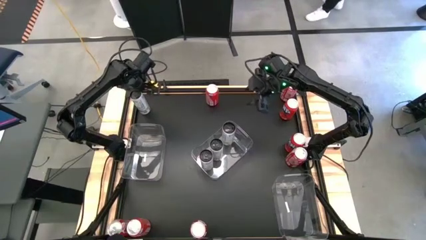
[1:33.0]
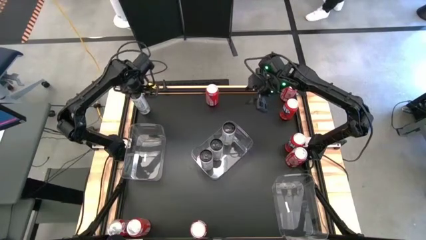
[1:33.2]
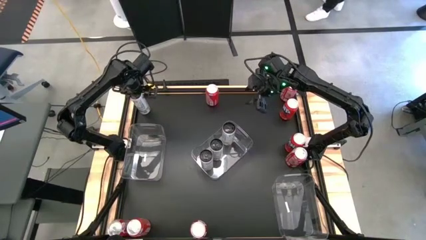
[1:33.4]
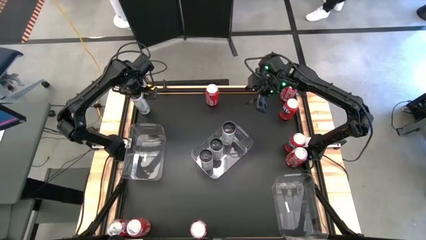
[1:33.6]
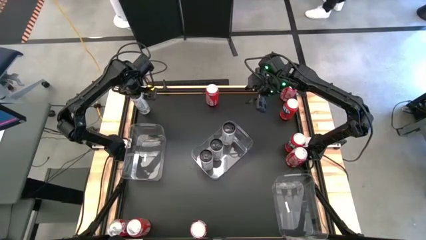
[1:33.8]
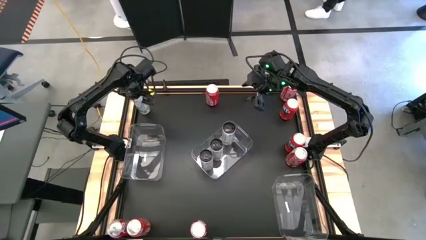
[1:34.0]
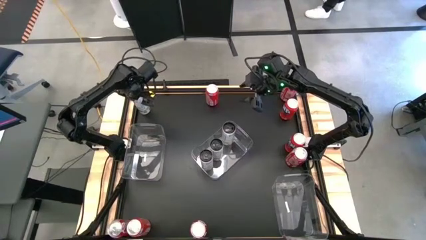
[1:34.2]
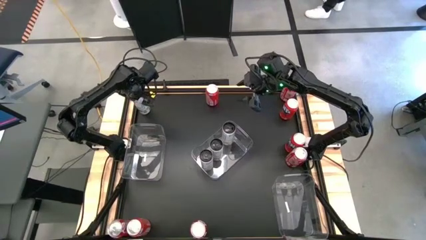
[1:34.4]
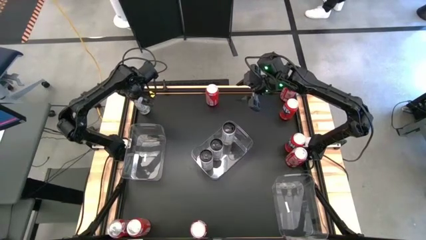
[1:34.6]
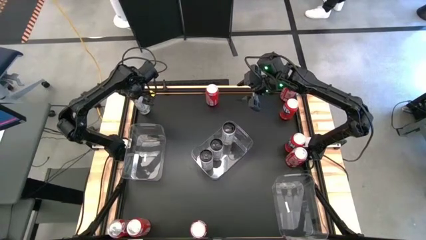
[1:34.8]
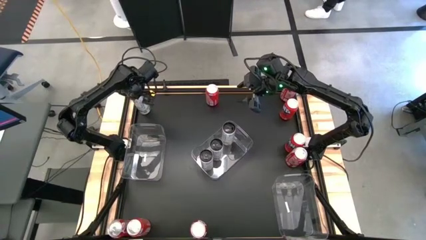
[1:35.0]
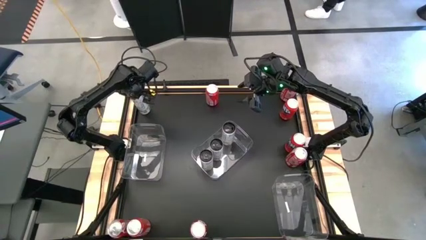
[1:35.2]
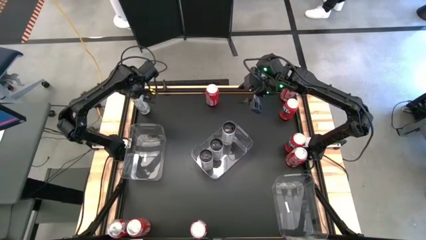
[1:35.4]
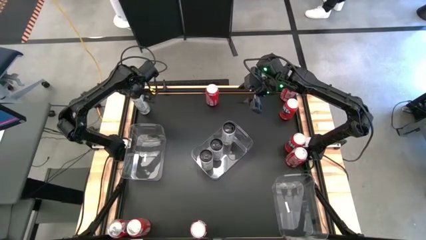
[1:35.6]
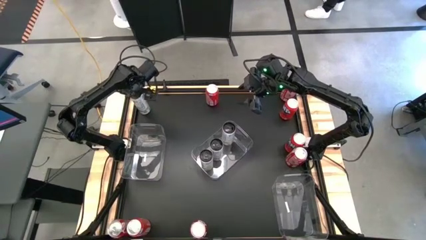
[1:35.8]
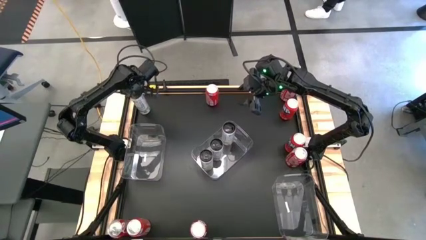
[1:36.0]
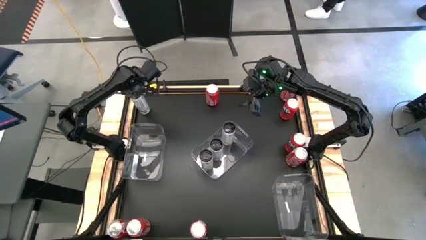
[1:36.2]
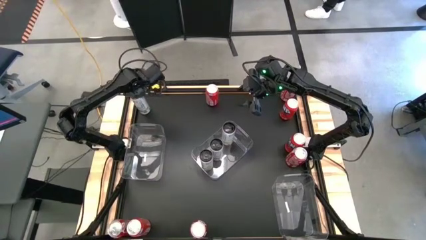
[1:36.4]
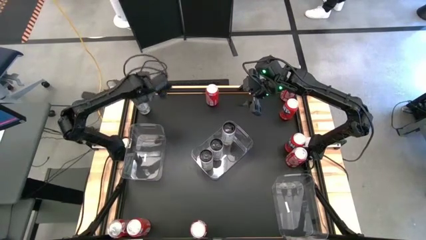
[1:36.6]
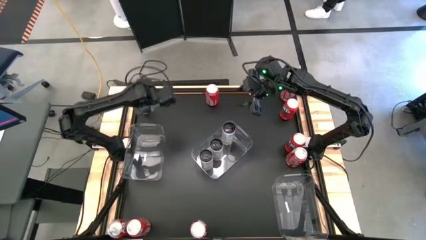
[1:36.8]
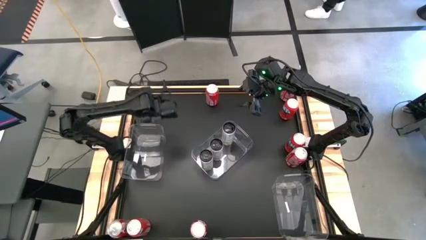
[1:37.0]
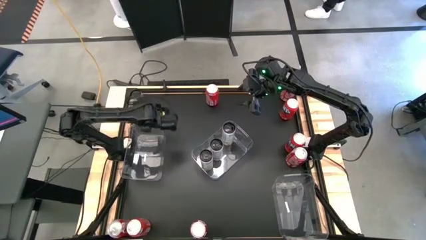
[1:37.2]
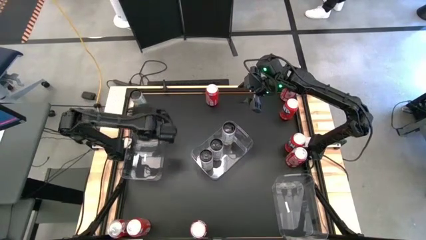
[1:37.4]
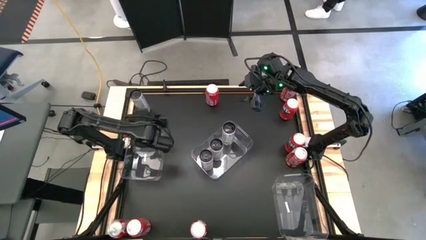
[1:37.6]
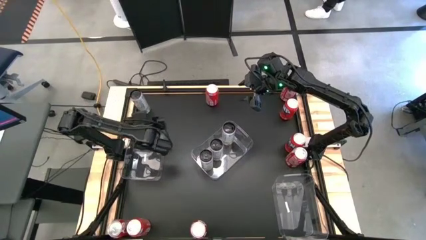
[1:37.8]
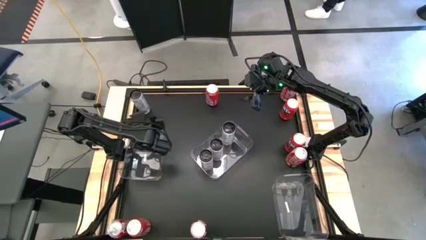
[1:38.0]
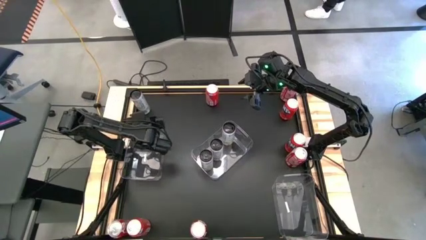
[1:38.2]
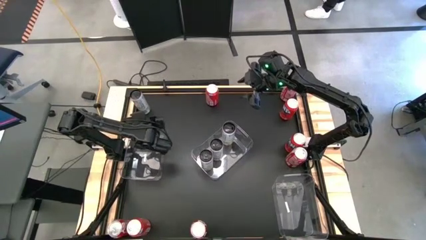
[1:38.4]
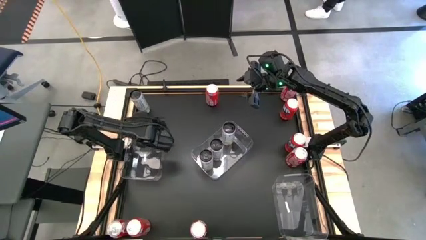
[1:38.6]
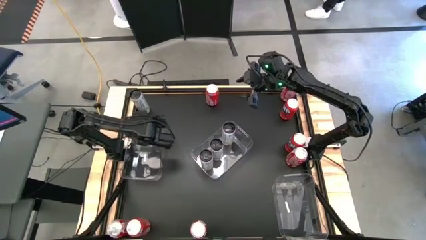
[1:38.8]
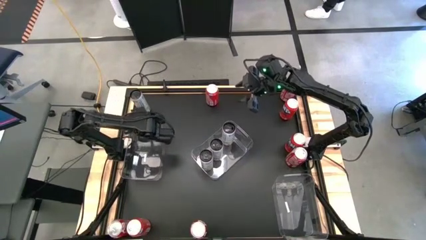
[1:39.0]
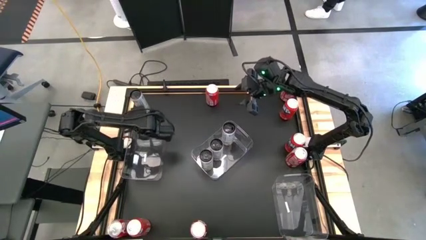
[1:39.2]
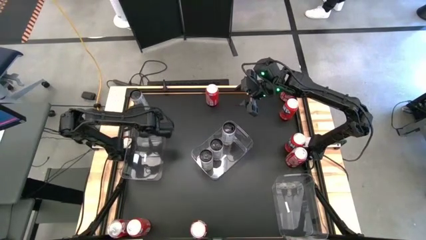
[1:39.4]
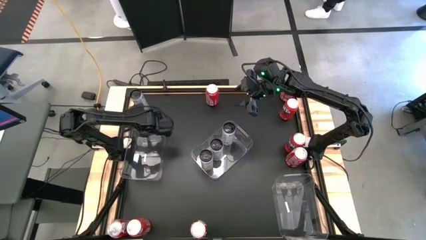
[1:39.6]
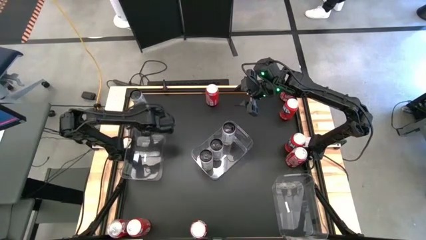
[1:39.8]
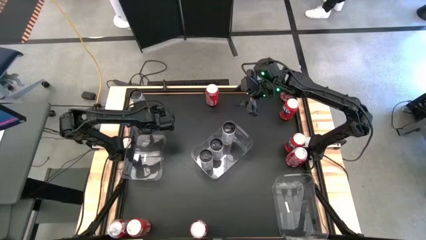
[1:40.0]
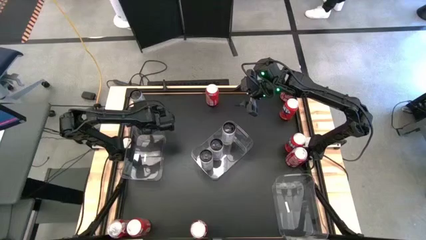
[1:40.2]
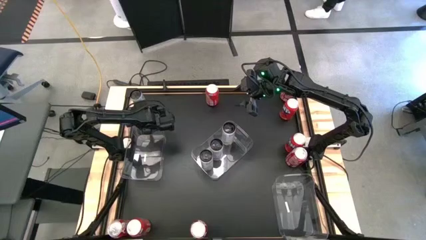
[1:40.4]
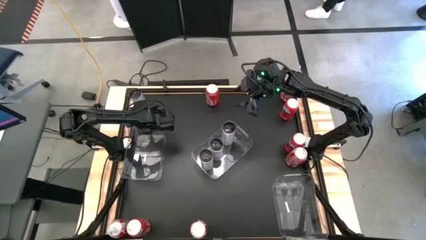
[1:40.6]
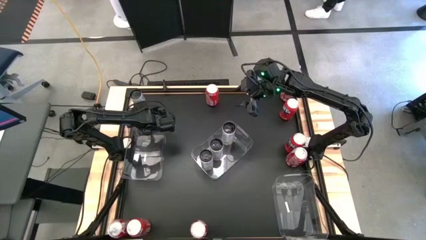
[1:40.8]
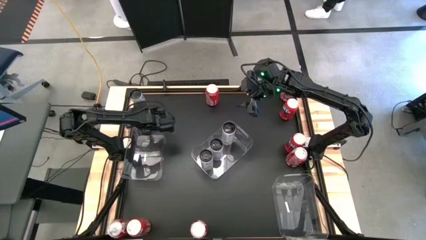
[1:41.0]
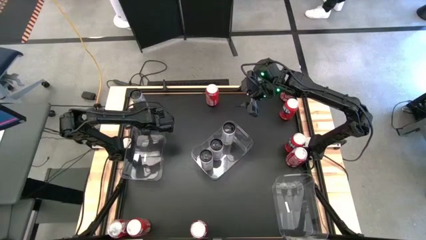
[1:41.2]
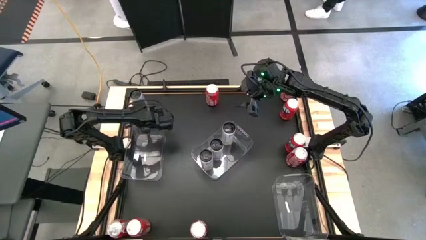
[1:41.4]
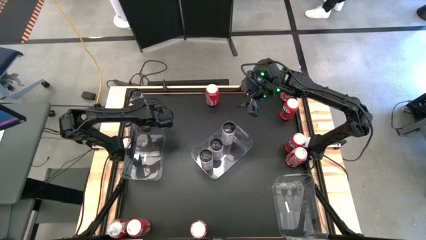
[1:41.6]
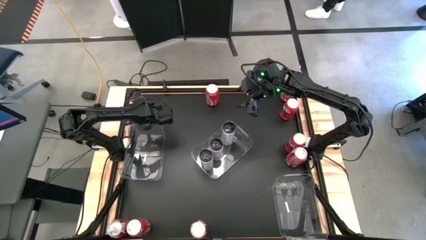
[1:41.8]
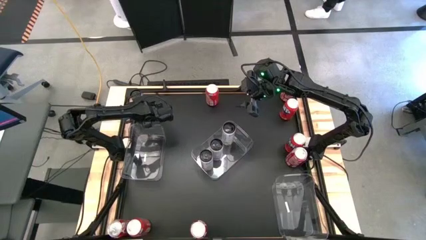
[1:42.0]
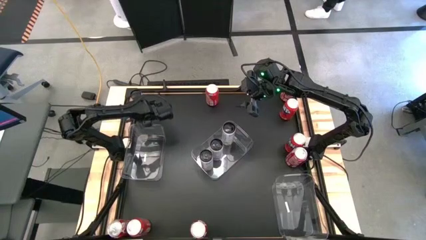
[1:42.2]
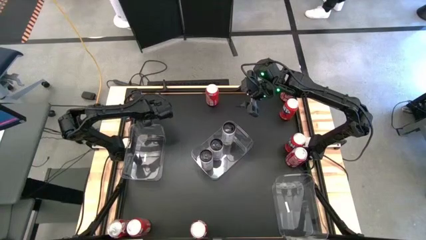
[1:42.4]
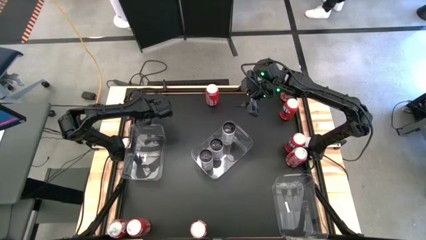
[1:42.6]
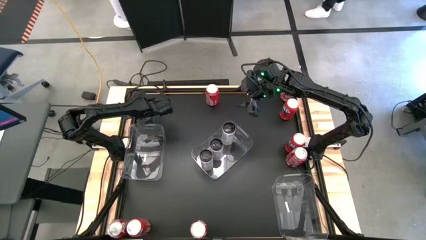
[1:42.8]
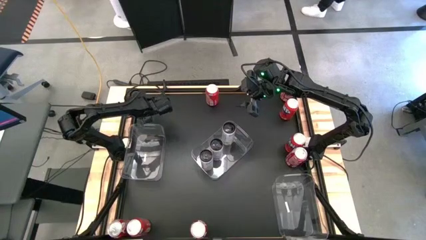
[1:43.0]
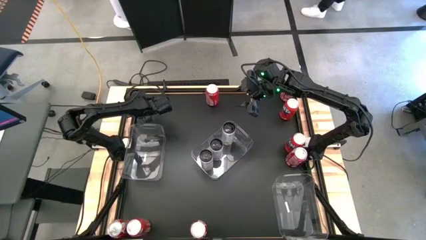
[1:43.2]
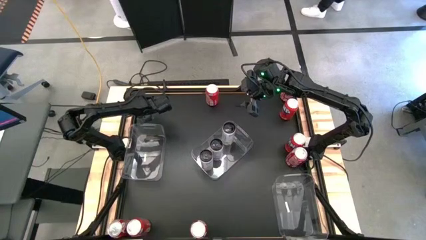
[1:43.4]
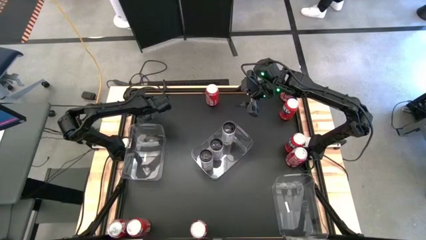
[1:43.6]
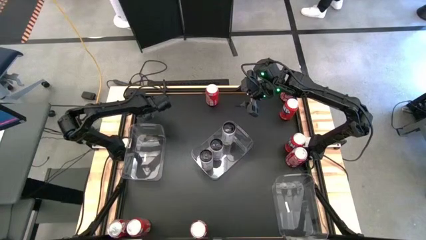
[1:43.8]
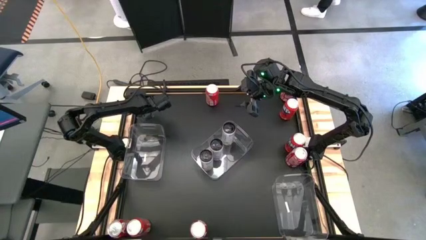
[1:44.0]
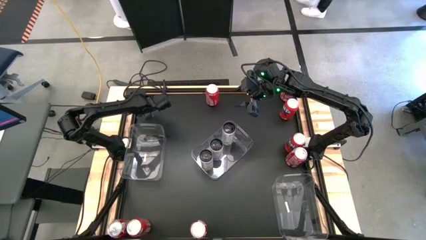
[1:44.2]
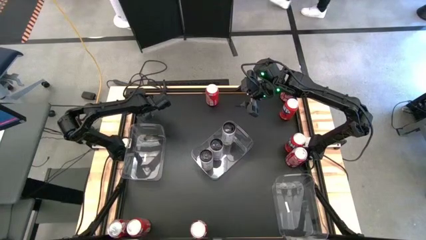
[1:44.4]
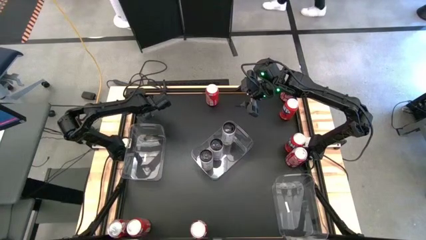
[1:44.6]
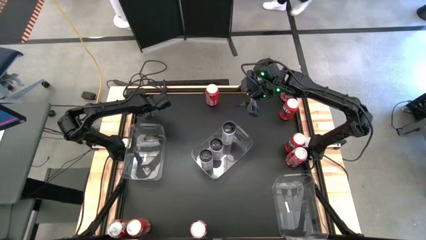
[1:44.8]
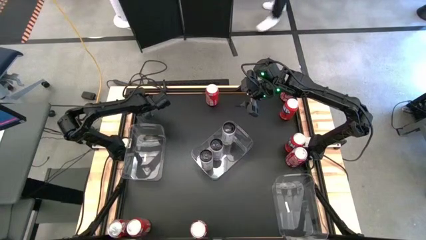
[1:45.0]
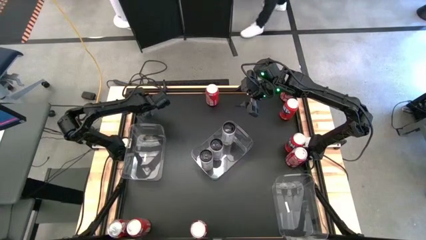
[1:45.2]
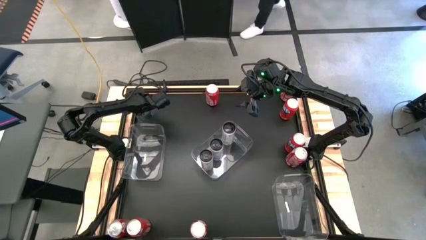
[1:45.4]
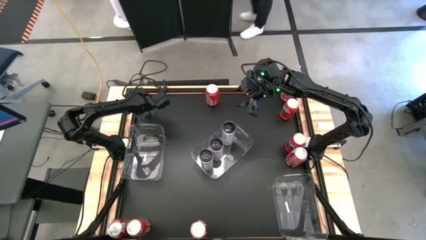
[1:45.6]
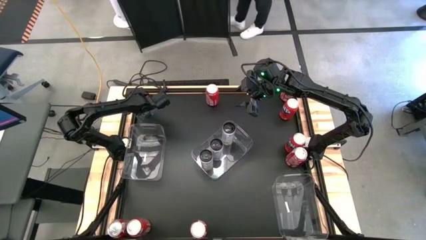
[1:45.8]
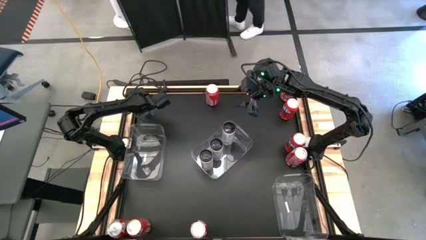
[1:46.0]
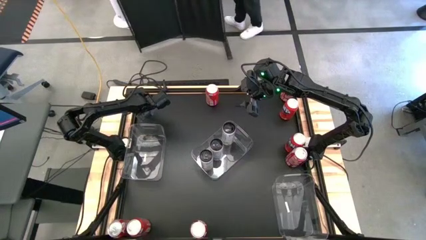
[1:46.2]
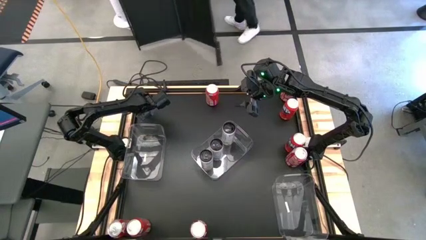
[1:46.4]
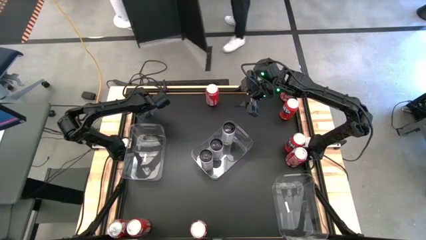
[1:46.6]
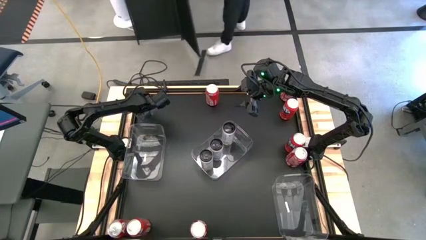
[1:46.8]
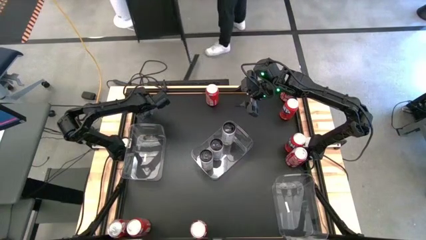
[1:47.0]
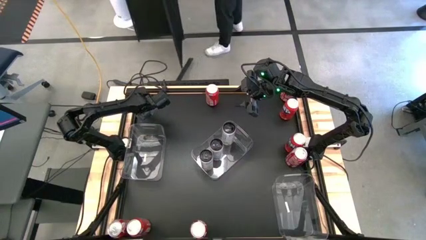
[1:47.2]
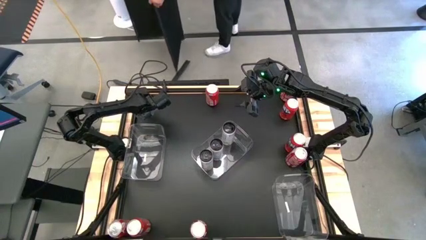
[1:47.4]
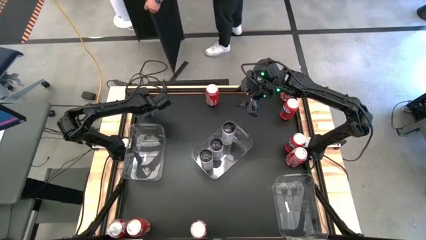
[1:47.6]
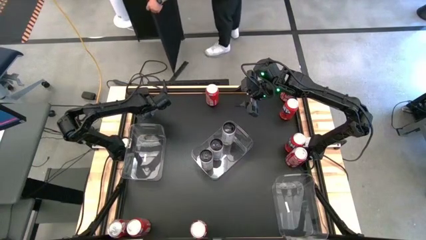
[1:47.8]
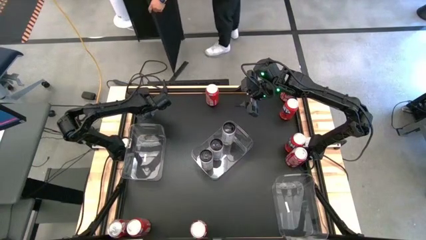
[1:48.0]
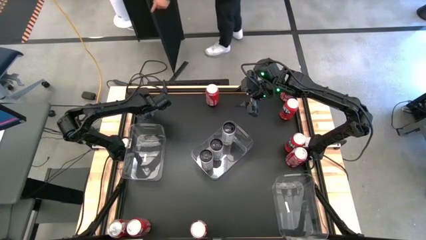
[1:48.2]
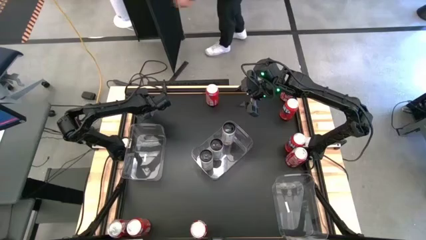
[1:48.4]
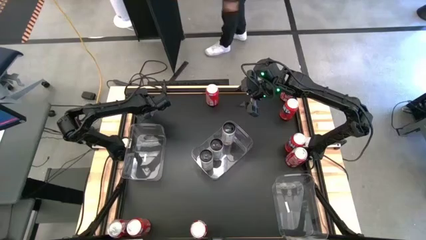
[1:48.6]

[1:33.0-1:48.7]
Task: Sort soda cans
Put the white soda can into the middle transparent bin
